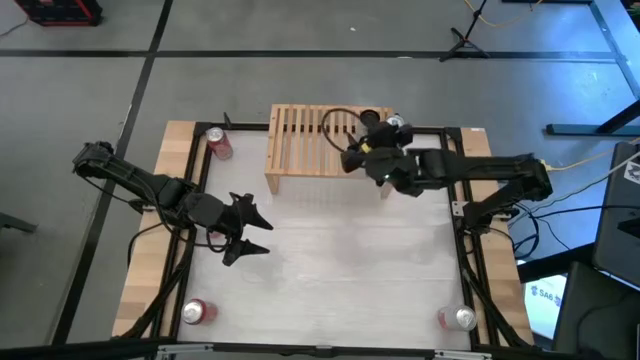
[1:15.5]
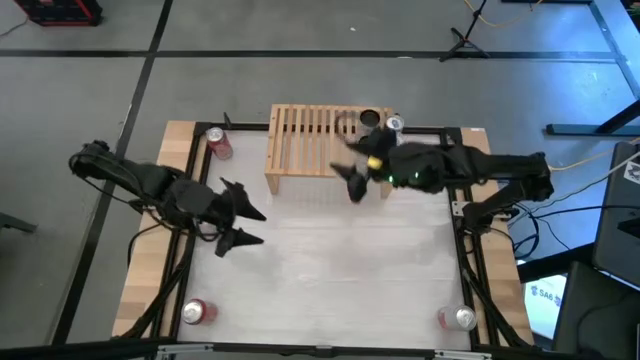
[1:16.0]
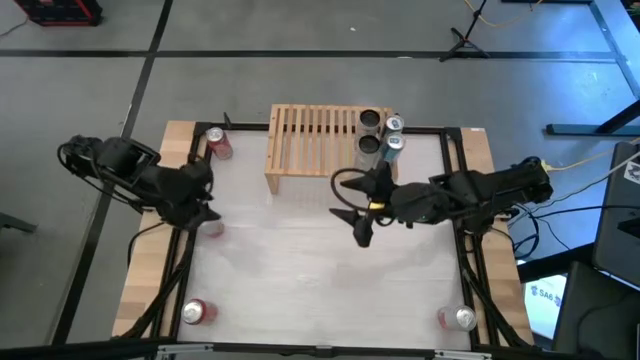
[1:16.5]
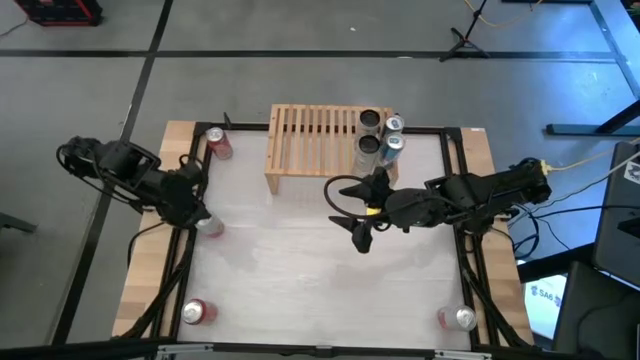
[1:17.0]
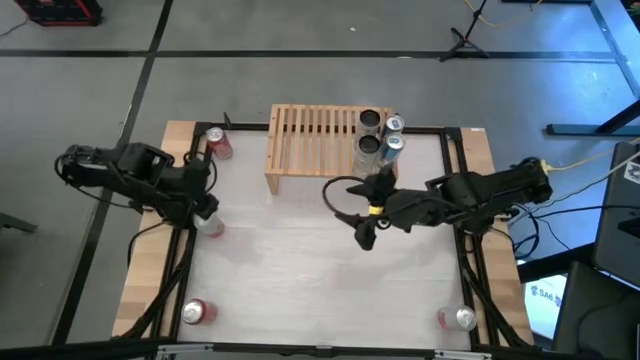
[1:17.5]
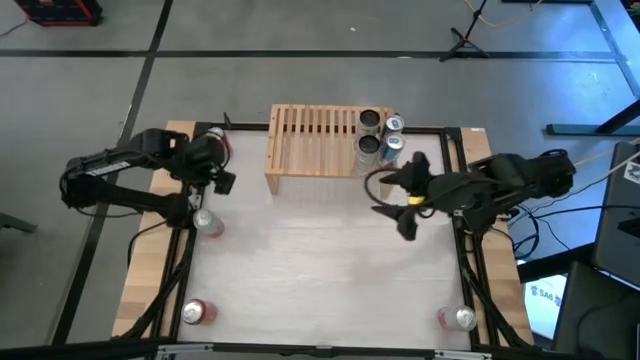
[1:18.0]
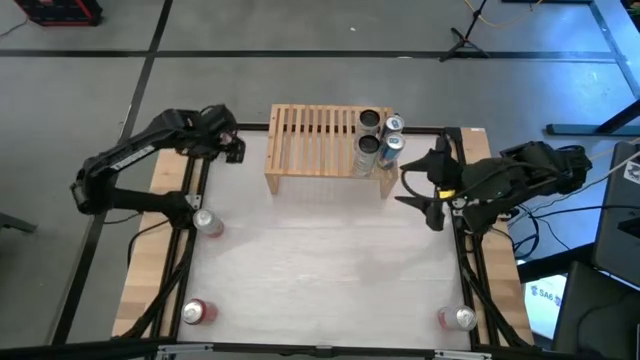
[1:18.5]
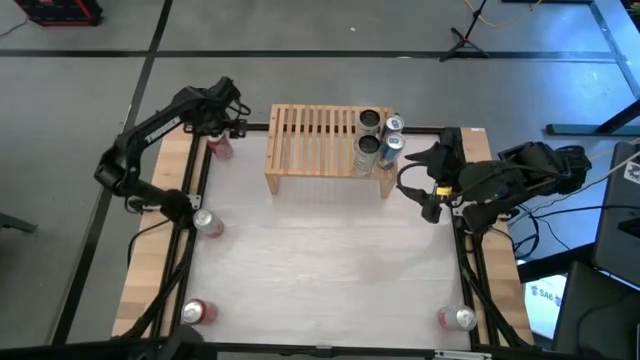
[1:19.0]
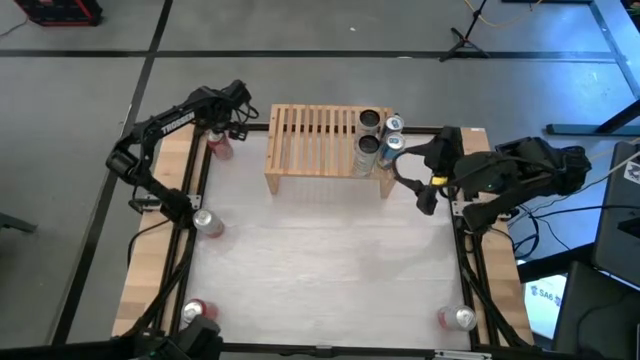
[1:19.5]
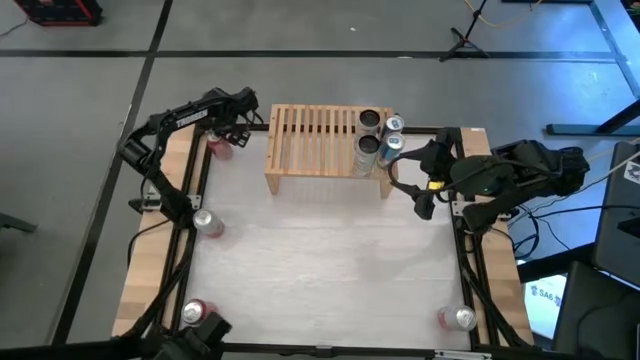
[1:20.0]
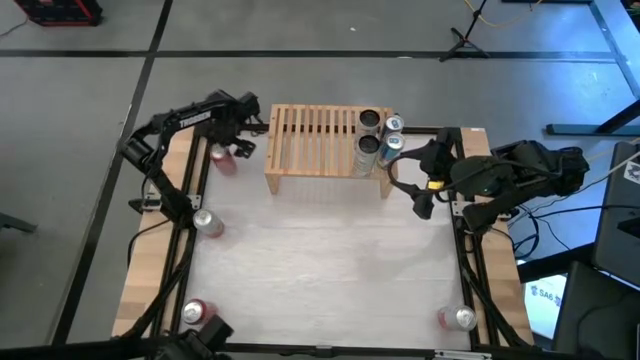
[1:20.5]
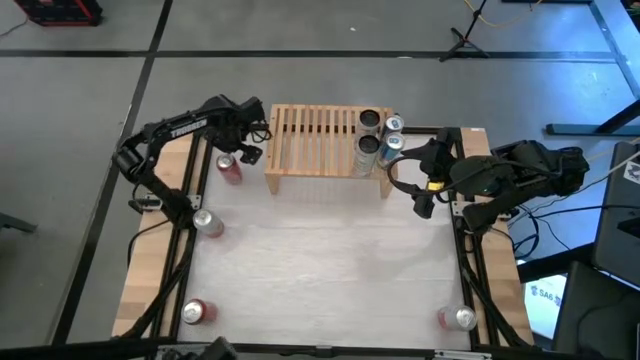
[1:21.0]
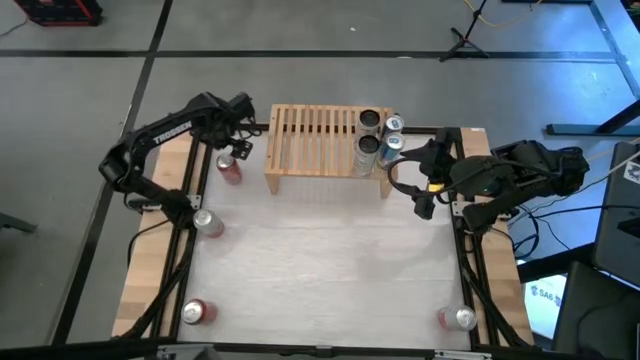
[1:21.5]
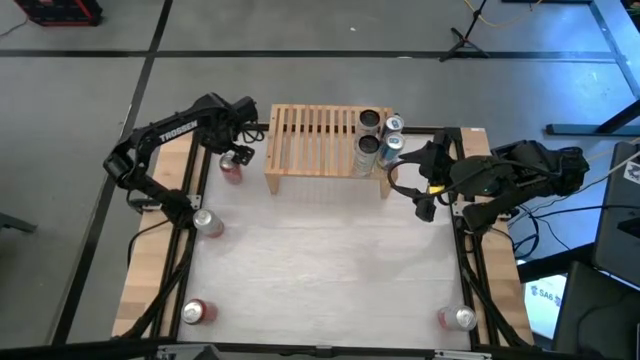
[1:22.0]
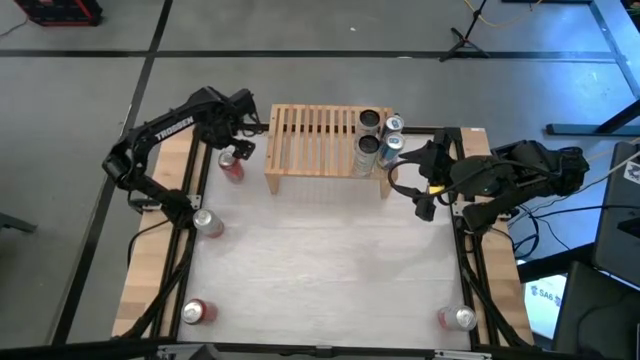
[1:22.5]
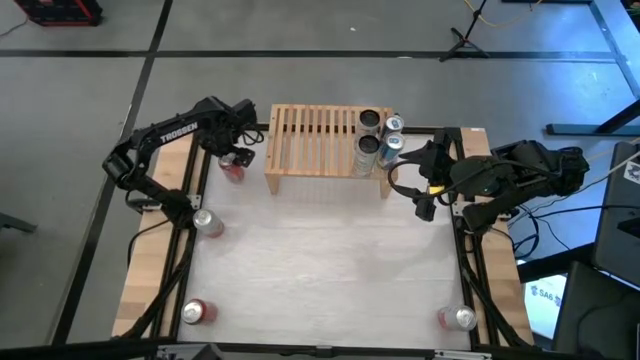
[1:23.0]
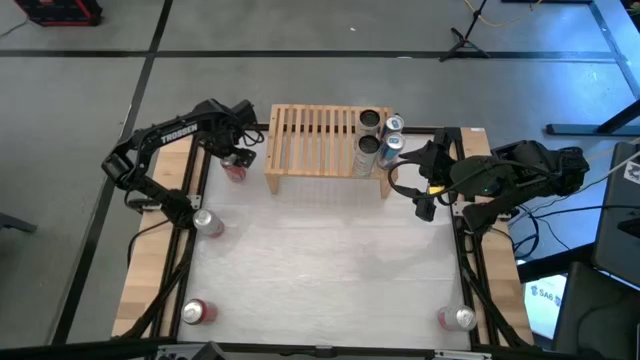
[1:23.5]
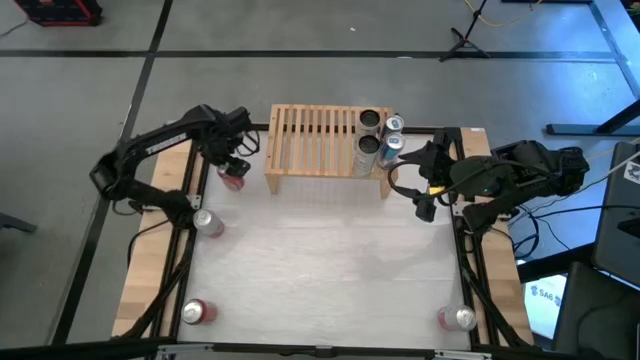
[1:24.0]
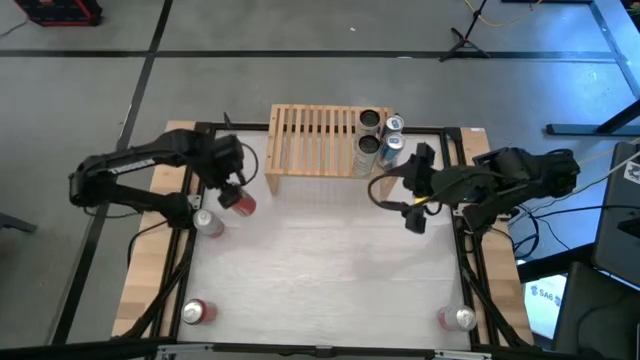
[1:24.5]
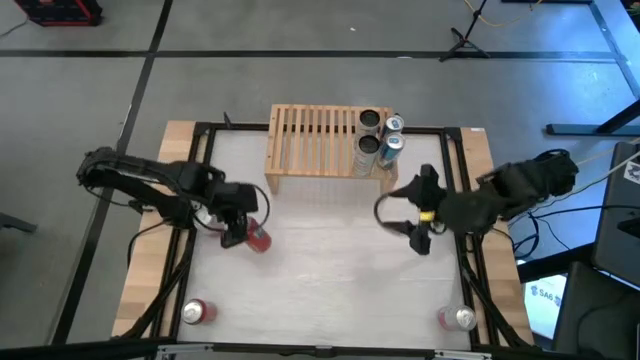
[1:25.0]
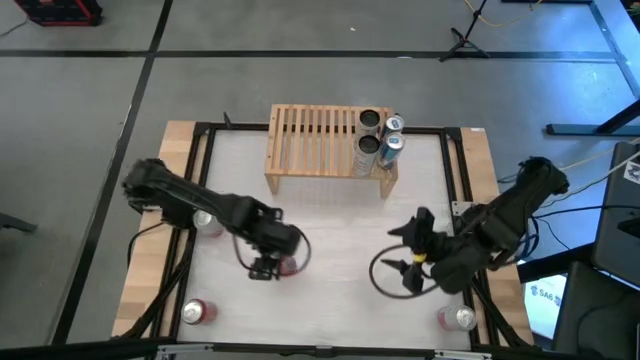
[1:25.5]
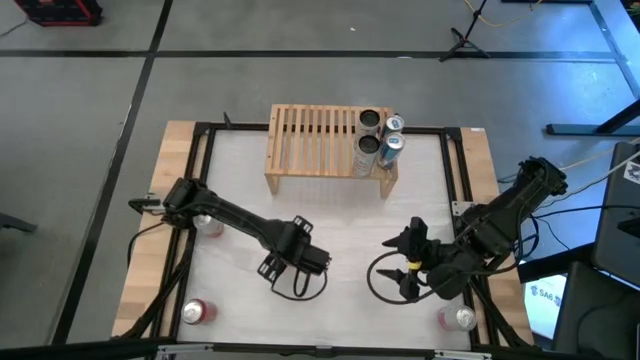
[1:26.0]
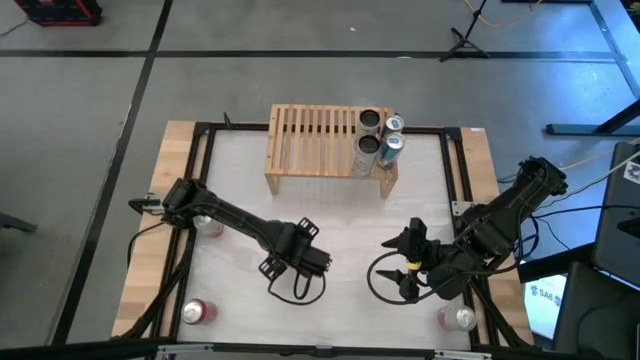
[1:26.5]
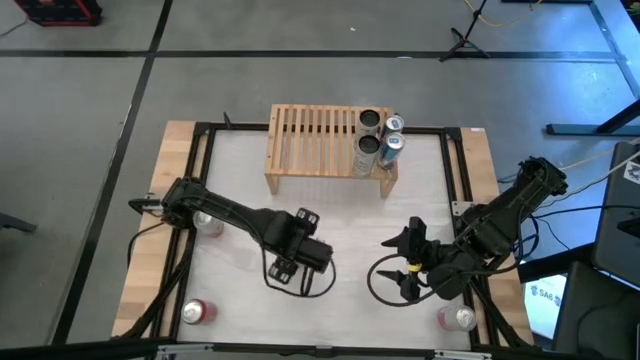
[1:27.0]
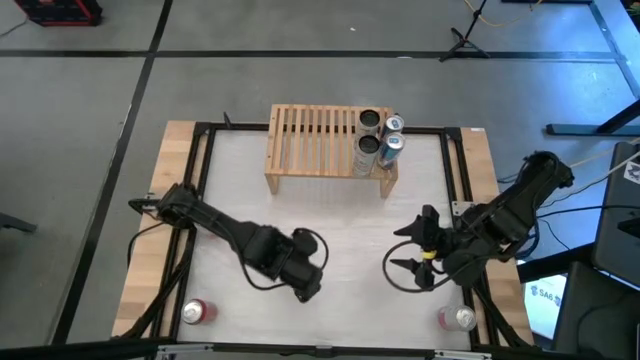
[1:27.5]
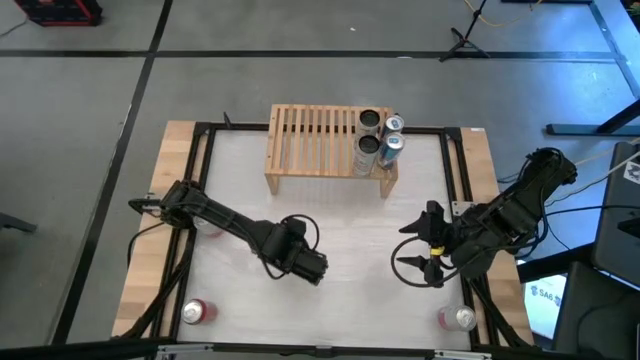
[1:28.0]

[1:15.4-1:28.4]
Task: Place canned beverage on shelf
Put the top red soda can on the shelf
